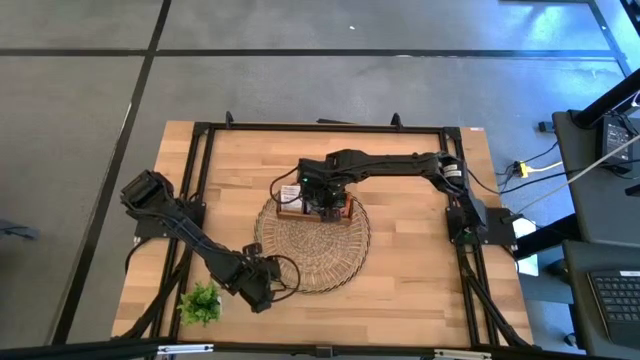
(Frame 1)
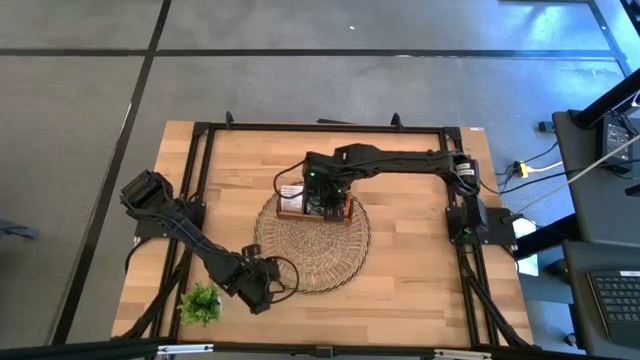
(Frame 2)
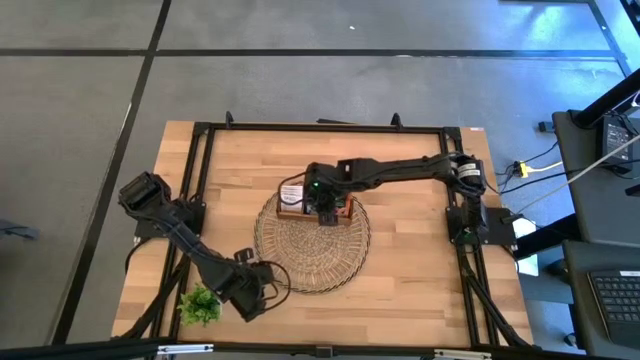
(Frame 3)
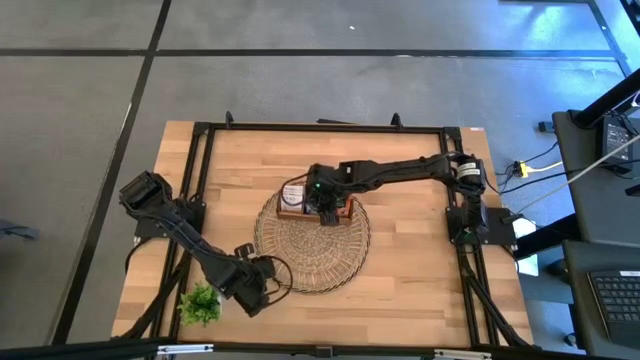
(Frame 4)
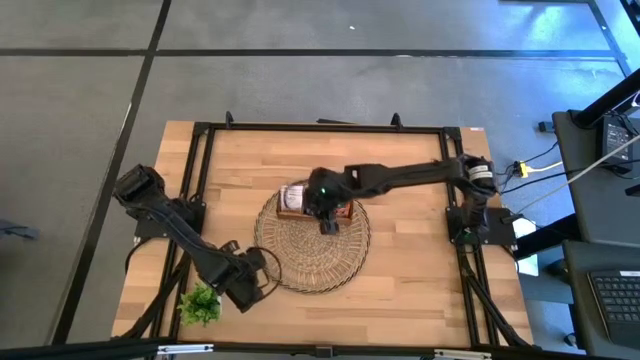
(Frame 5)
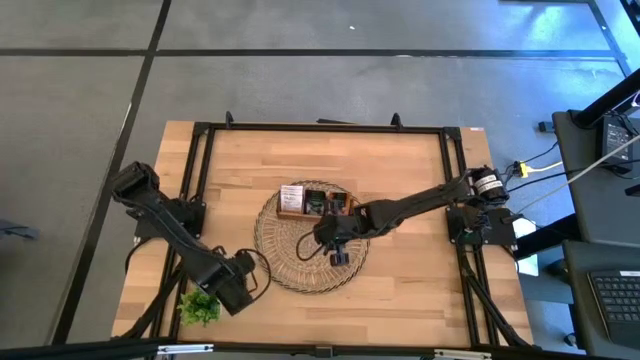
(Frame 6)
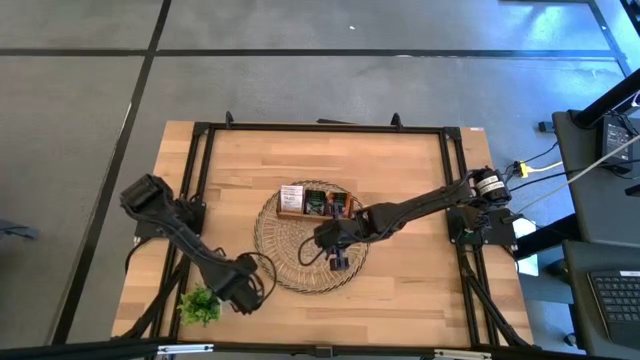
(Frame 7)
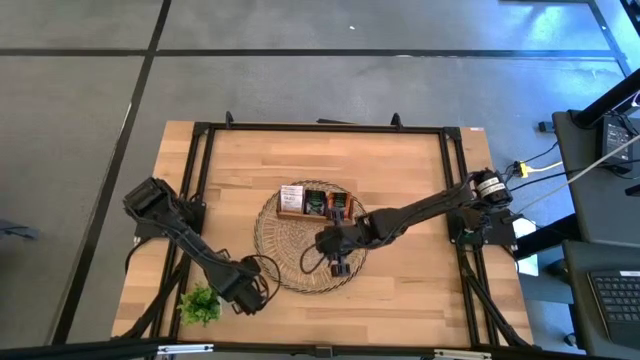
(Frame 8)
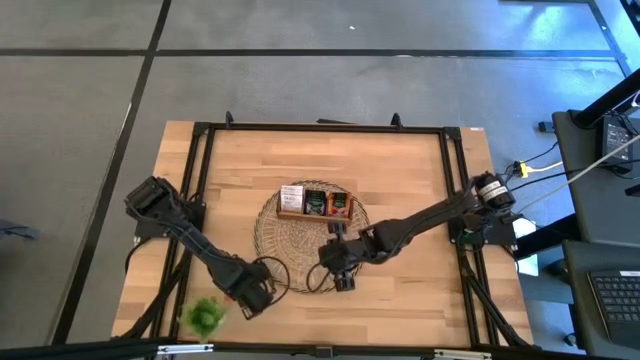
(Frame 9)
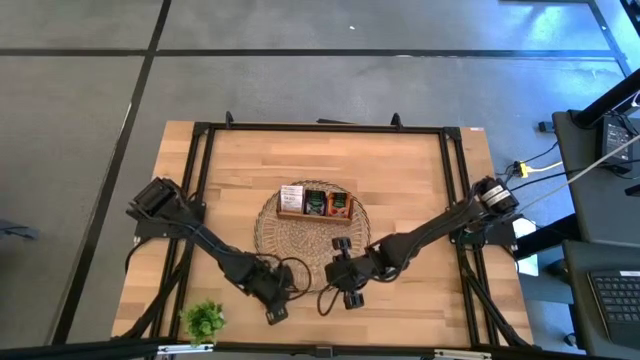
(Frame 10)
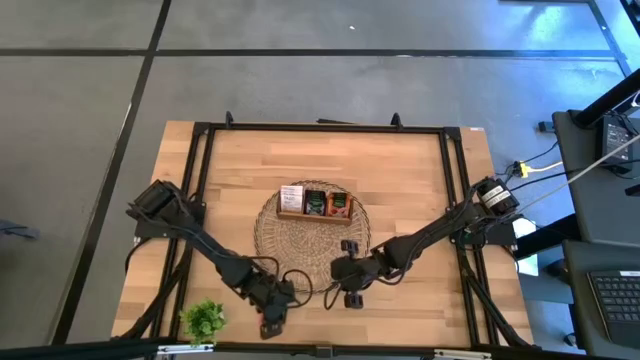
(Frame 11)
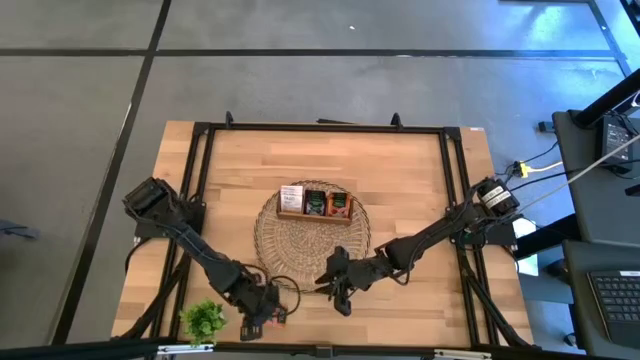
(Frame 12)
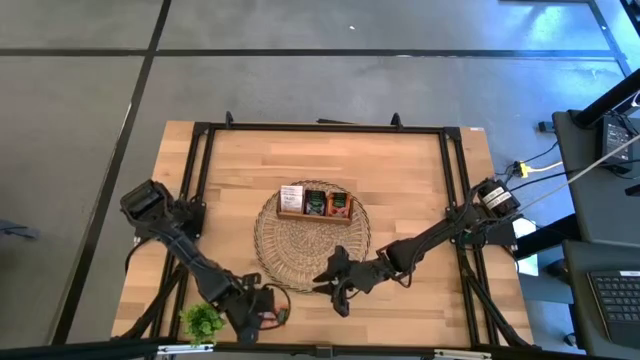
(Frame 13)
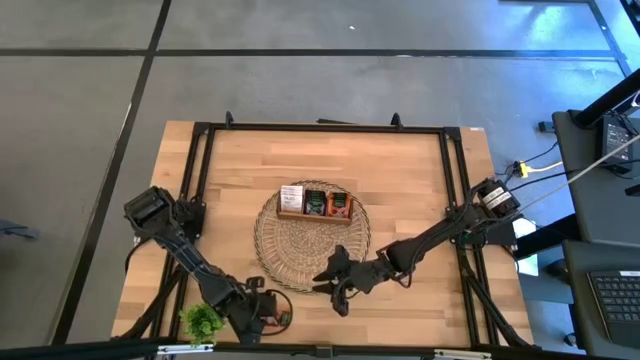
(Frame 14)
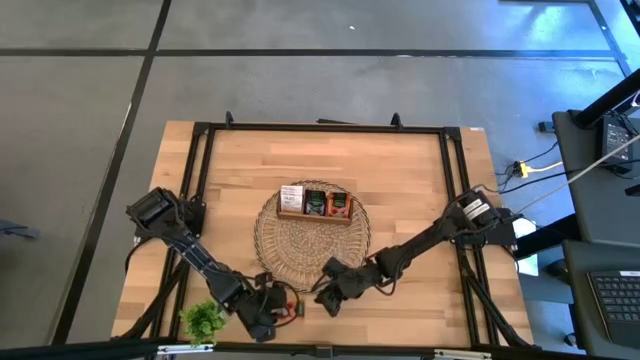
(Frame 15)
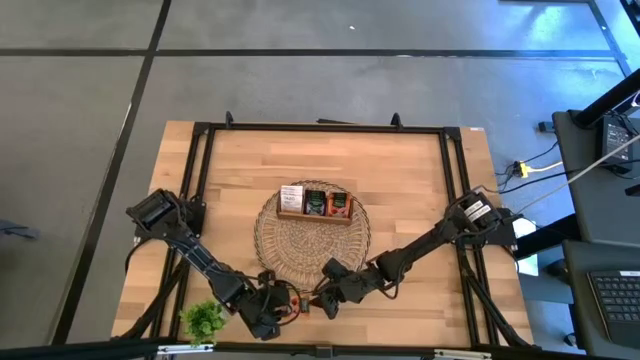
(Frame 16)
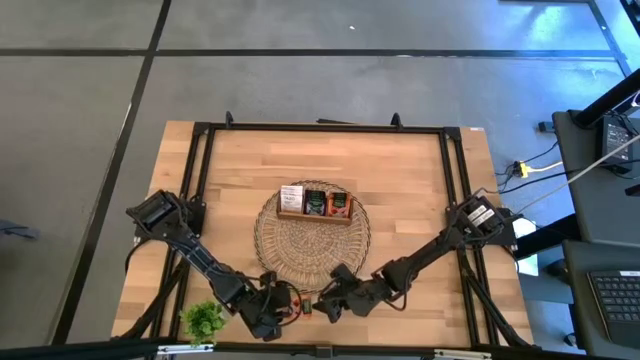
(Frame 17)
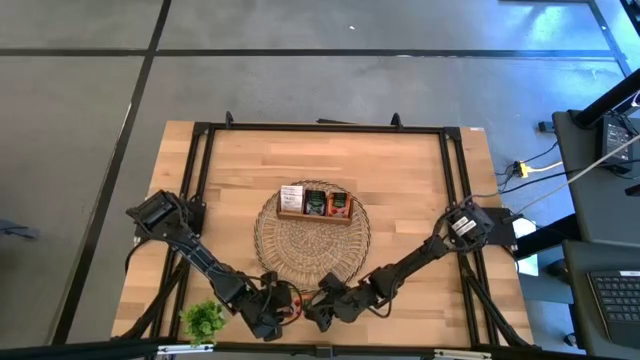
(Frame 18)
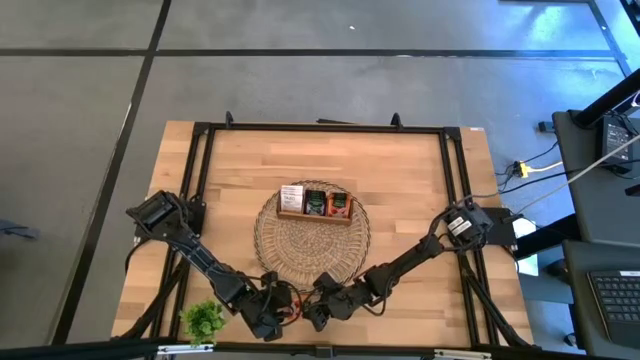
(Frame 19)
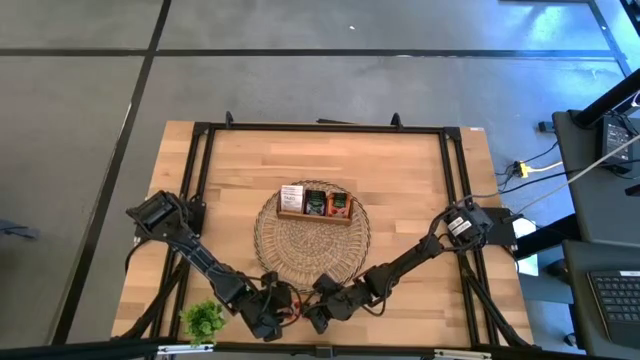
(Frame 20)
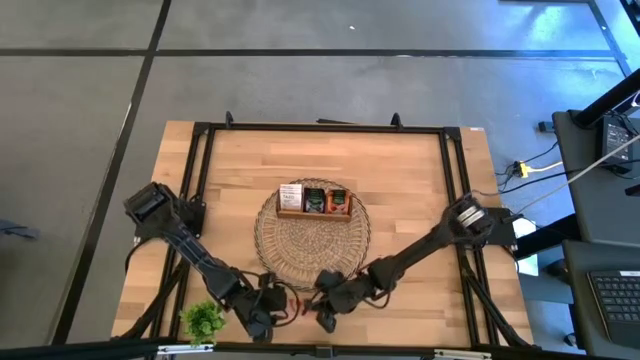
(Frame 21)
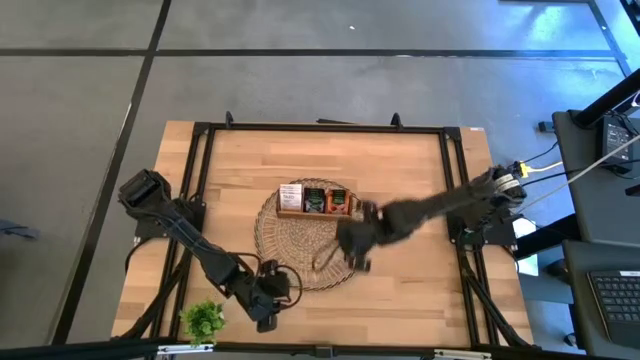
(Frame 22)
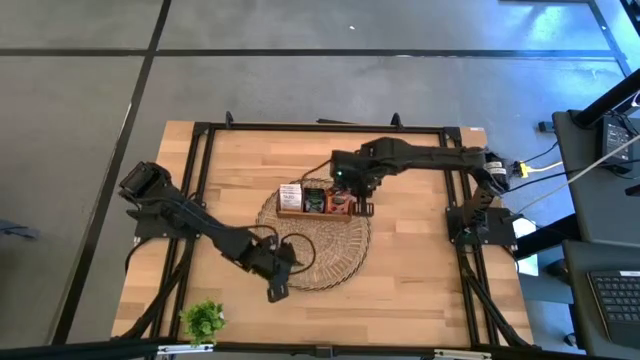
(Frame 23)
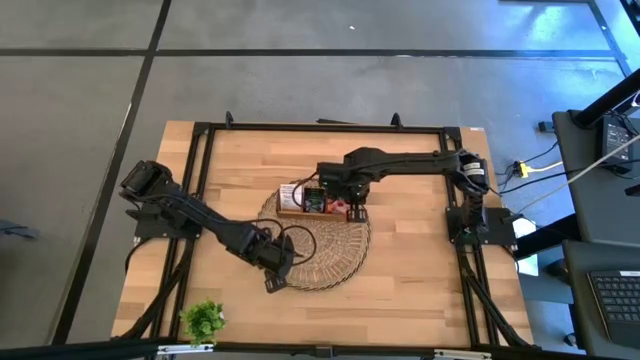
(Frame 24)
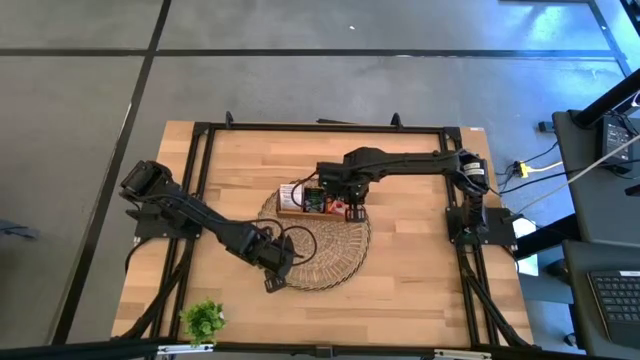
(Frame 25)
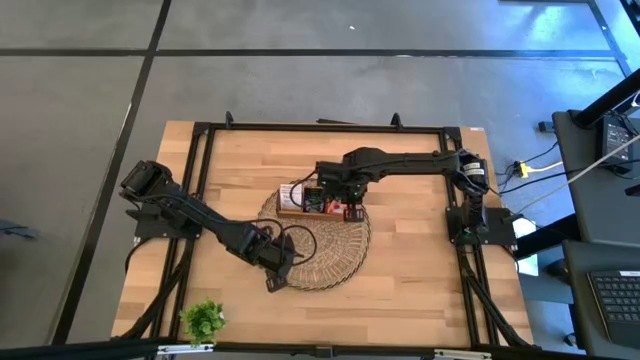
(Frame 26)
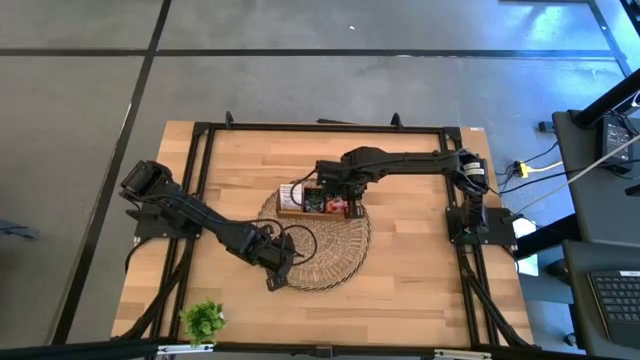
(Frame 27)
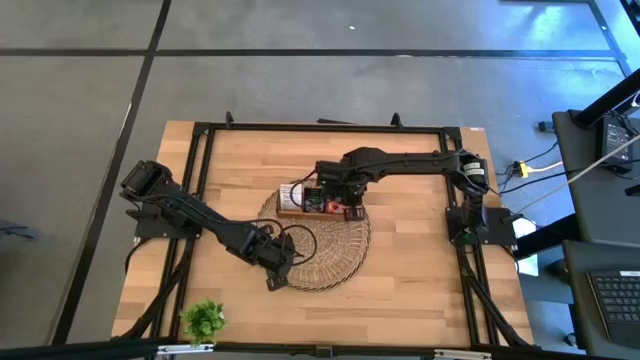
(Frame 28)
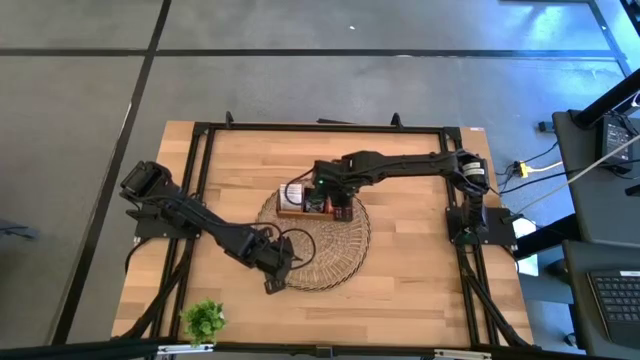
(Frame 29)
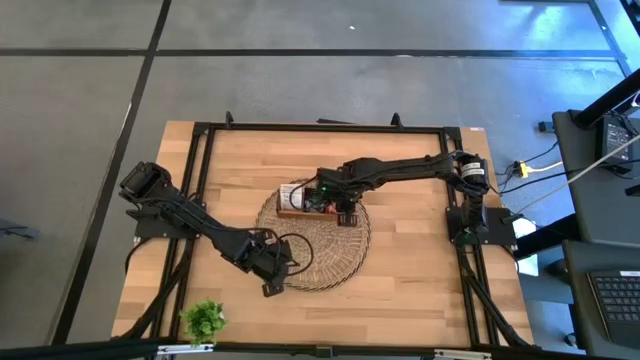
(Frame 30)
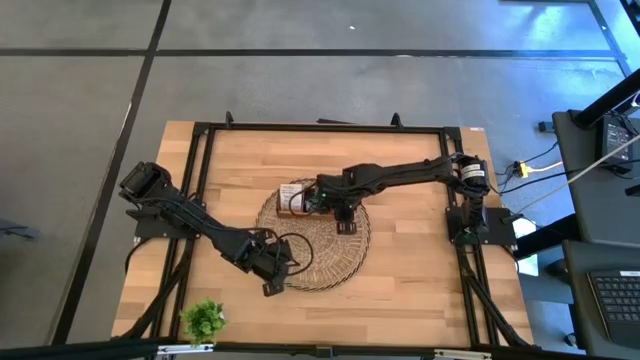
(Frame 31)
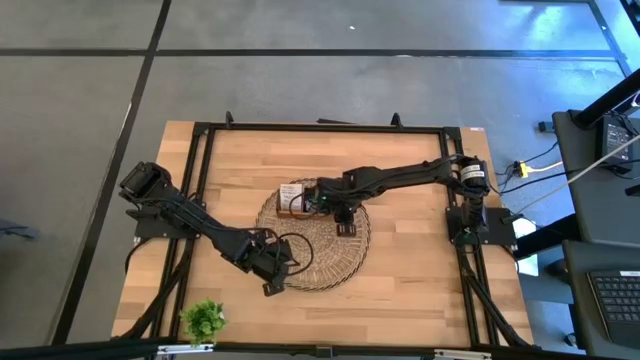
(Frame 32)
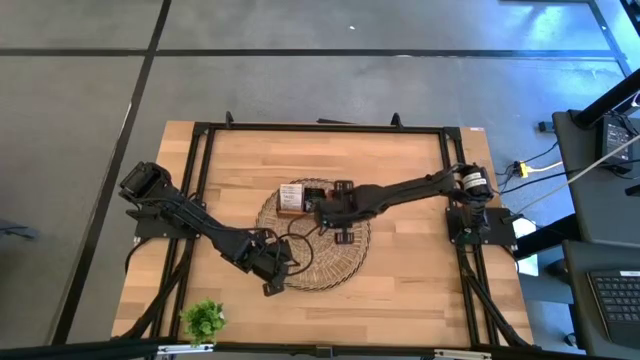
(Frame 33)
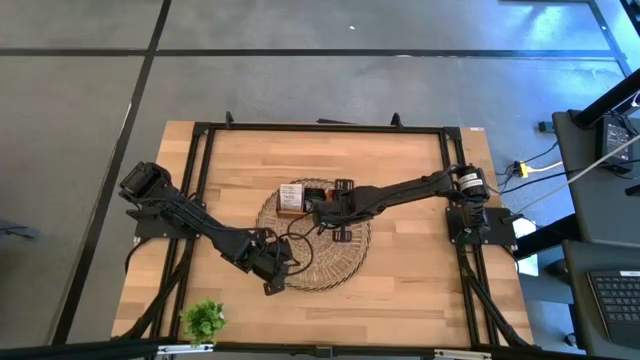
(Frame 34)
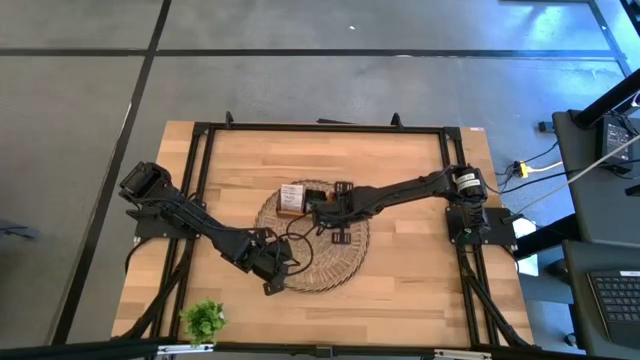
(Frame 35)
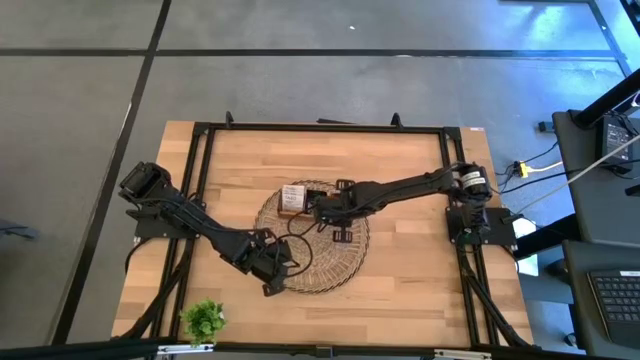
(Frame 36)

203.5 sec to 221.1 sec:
Task: Pick & Place Tea
Put the orange tea bag into the right slot of the wooden organizer

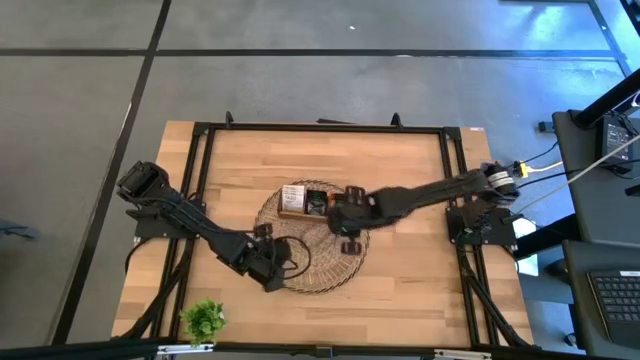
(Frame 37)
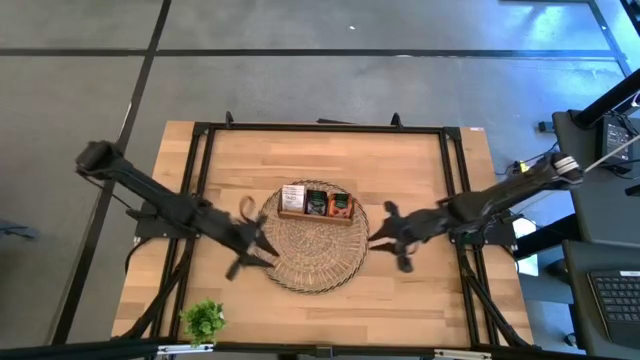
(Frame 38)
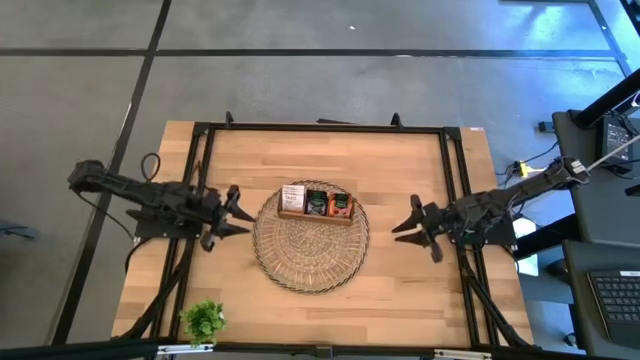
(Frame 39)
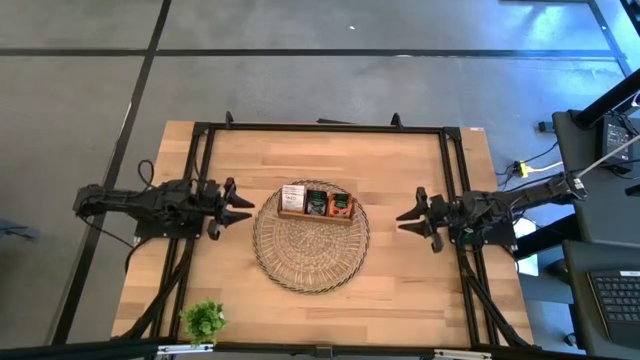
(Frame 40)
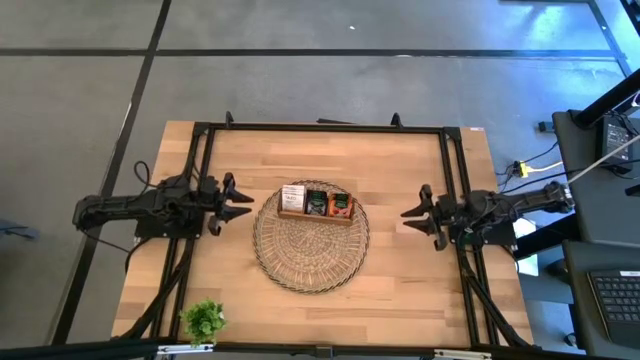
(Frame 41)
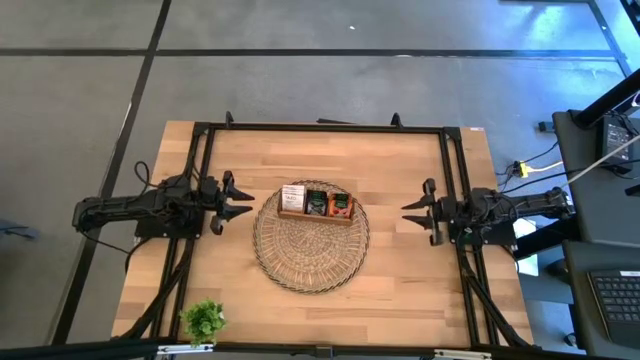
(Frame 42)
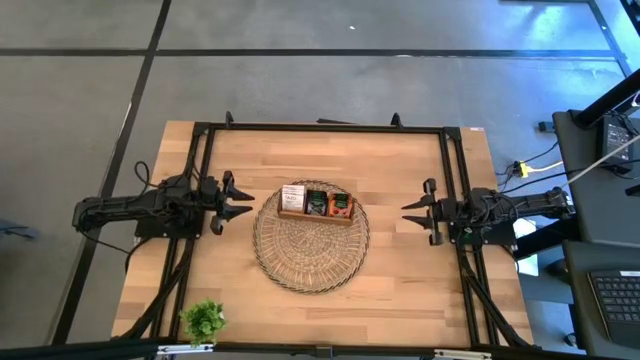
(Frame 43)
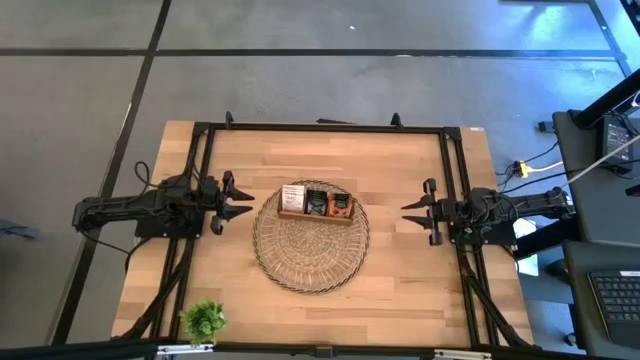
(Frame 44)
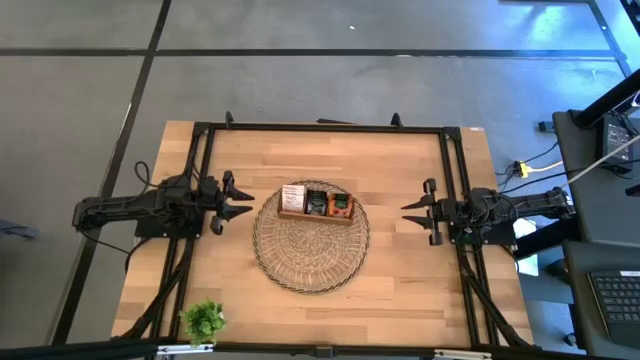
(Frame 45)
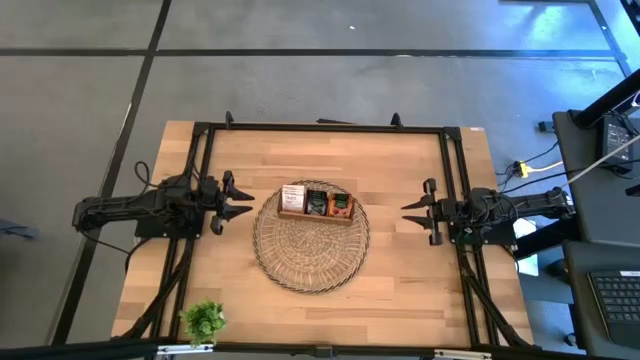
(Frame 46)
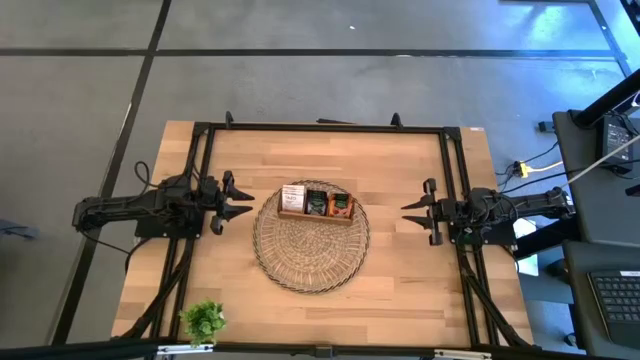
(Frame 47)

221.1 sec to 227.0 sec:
Return to Home Position
